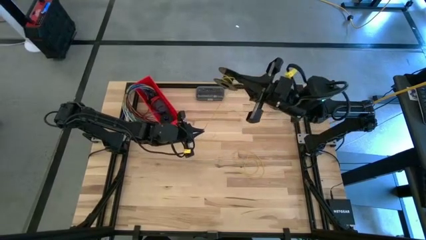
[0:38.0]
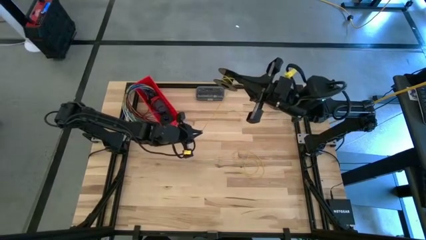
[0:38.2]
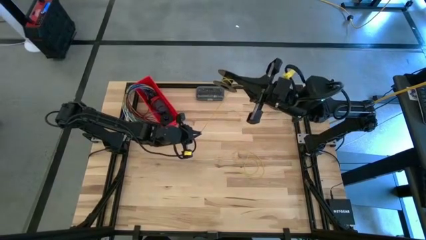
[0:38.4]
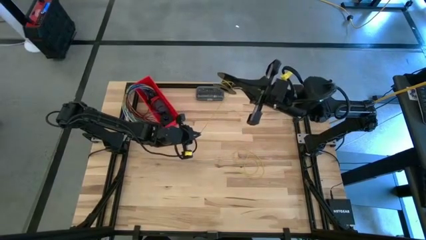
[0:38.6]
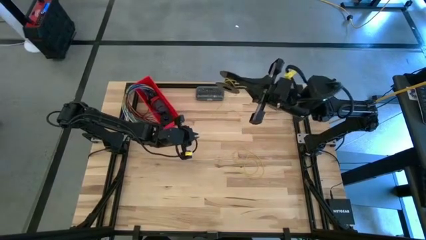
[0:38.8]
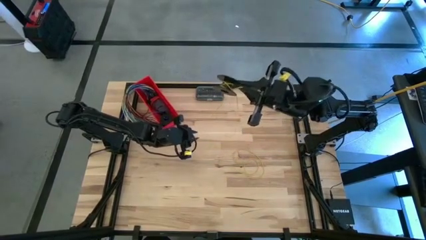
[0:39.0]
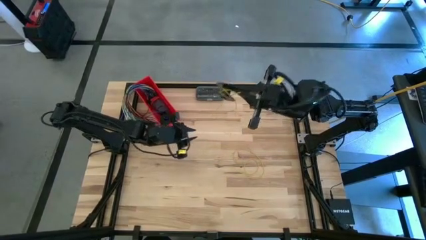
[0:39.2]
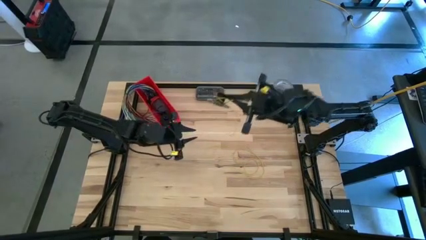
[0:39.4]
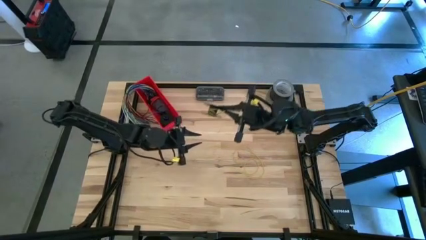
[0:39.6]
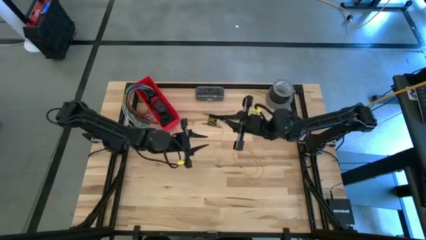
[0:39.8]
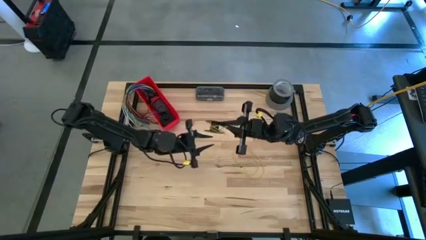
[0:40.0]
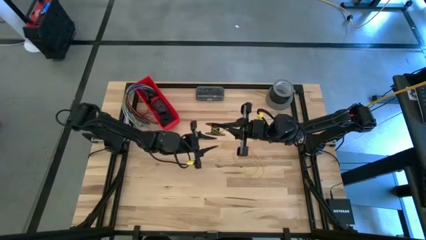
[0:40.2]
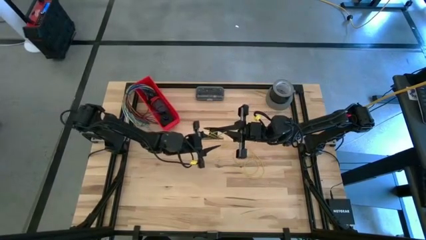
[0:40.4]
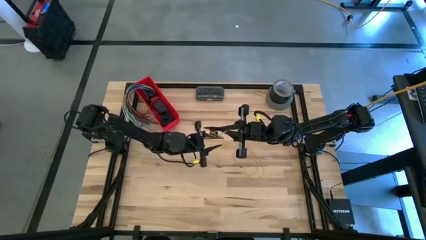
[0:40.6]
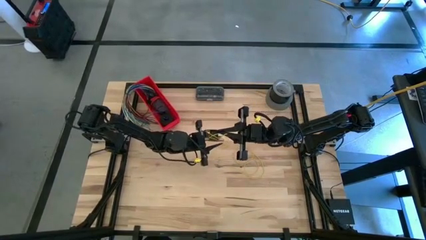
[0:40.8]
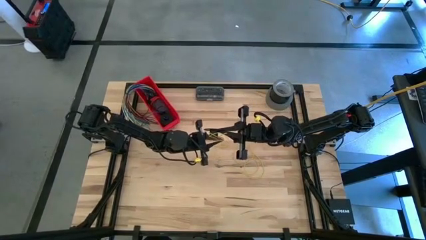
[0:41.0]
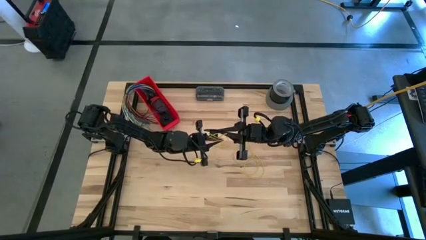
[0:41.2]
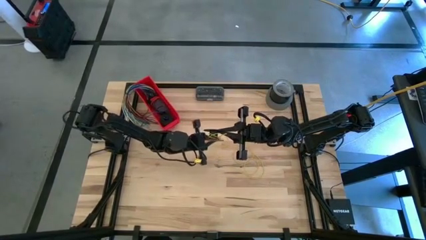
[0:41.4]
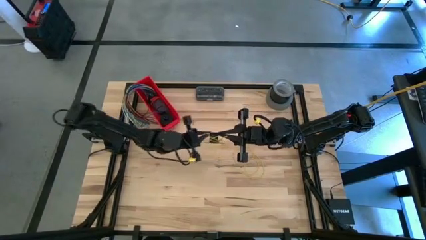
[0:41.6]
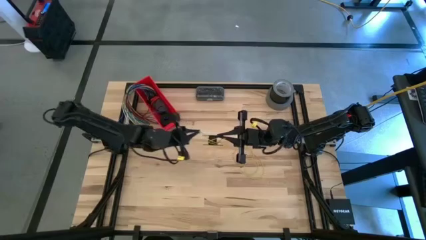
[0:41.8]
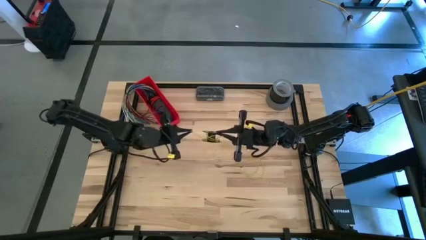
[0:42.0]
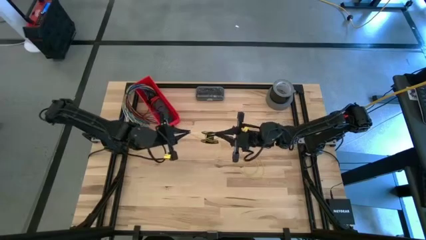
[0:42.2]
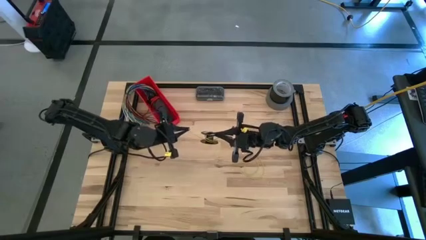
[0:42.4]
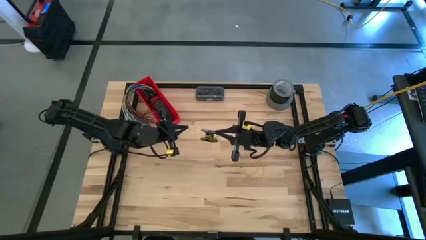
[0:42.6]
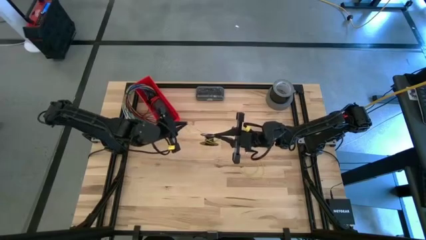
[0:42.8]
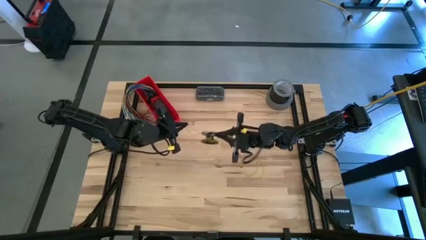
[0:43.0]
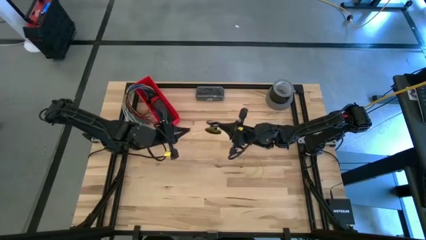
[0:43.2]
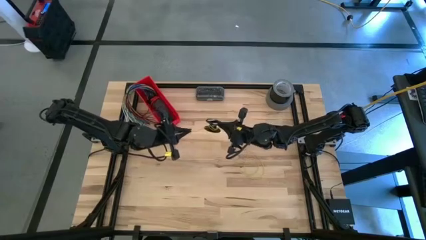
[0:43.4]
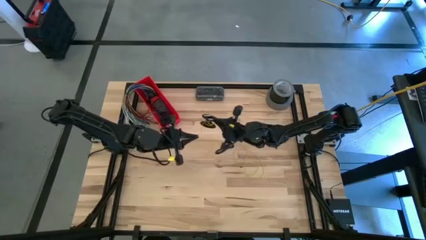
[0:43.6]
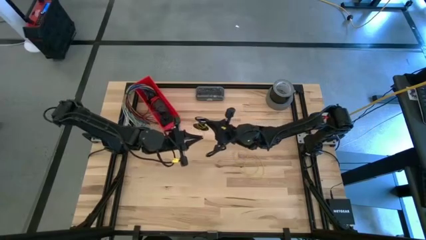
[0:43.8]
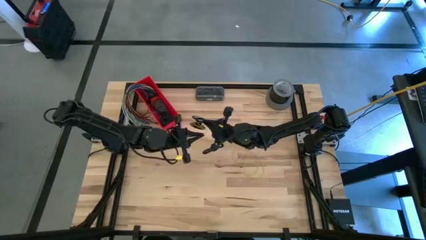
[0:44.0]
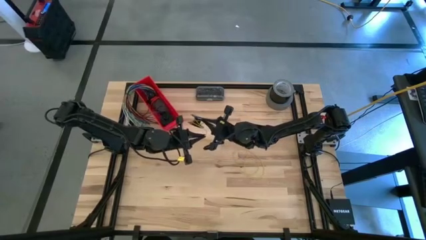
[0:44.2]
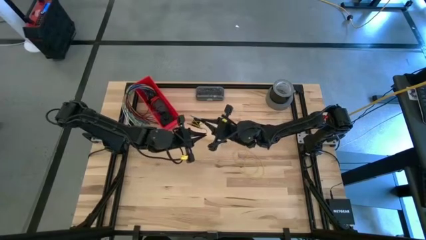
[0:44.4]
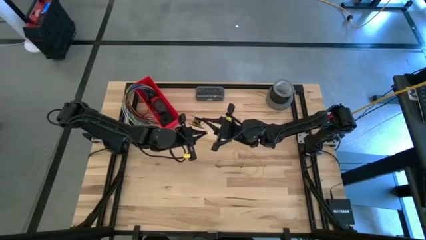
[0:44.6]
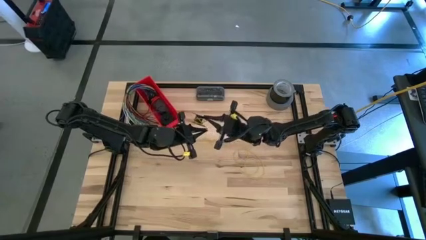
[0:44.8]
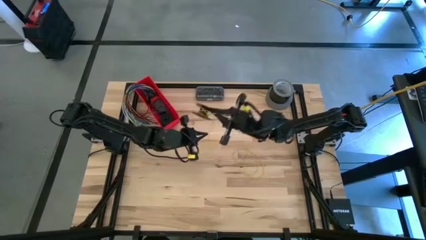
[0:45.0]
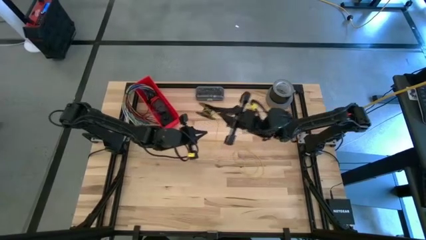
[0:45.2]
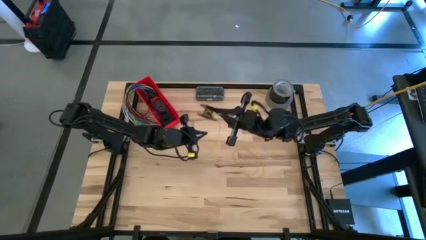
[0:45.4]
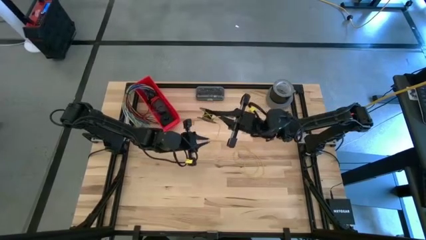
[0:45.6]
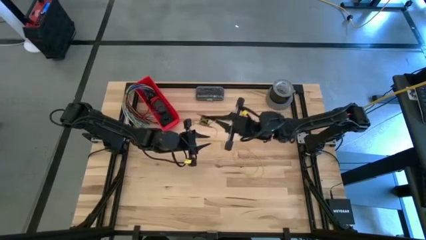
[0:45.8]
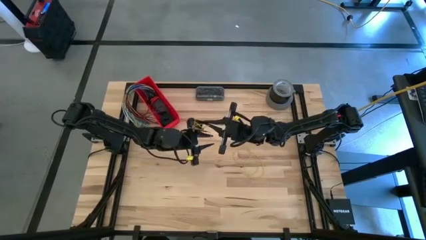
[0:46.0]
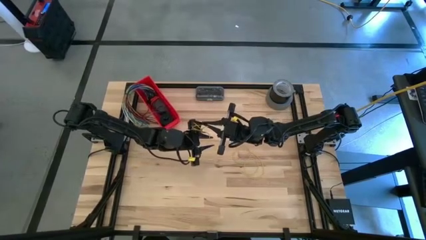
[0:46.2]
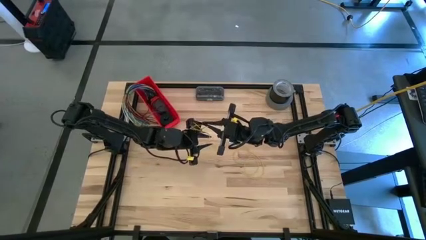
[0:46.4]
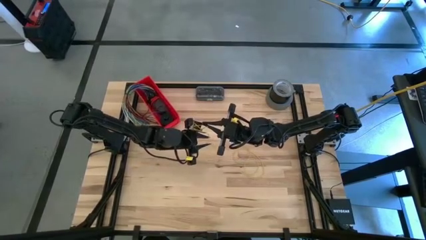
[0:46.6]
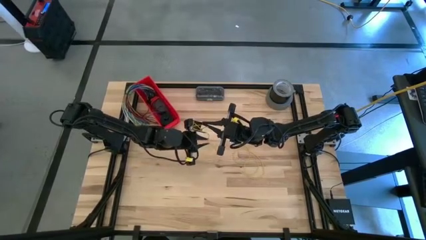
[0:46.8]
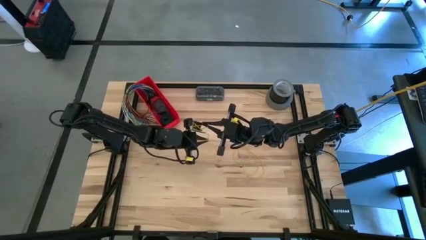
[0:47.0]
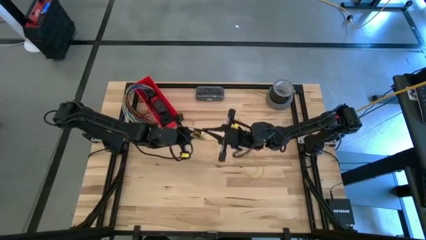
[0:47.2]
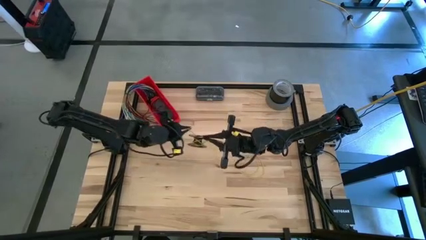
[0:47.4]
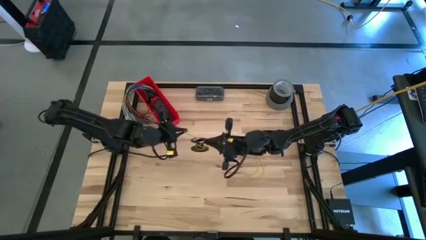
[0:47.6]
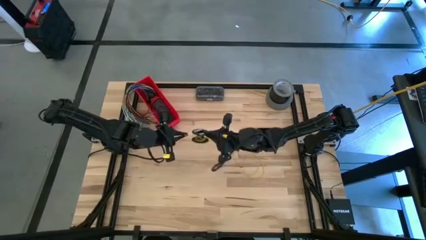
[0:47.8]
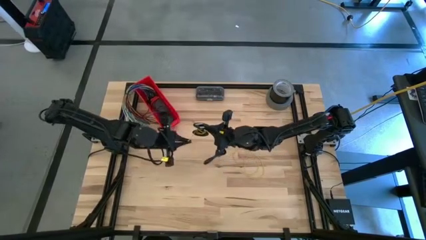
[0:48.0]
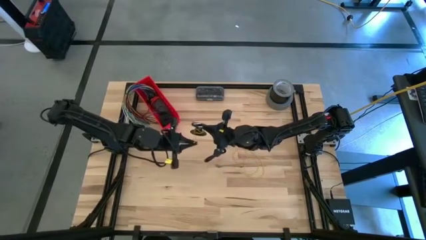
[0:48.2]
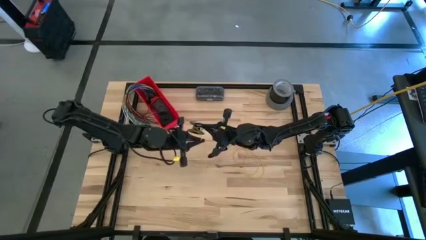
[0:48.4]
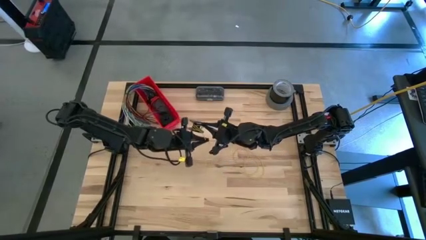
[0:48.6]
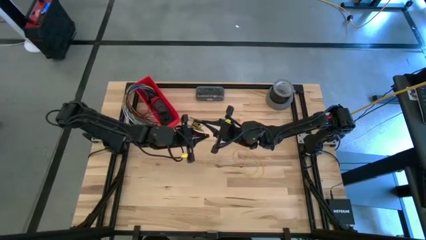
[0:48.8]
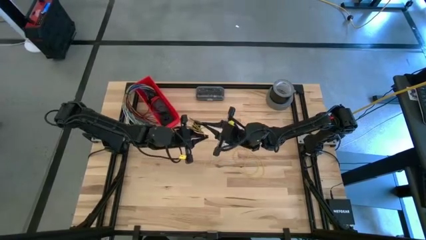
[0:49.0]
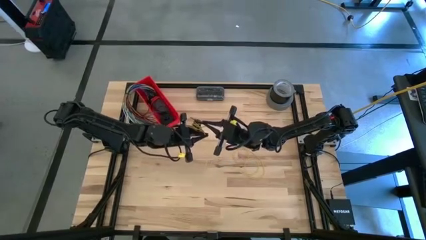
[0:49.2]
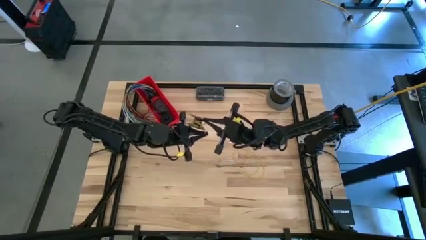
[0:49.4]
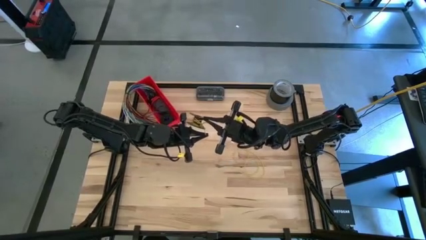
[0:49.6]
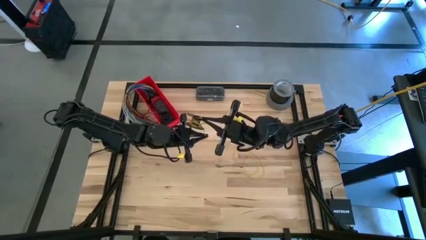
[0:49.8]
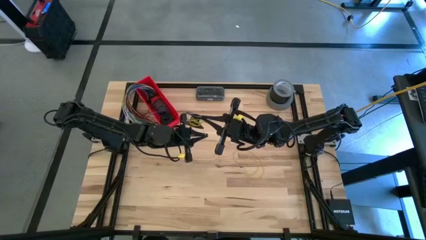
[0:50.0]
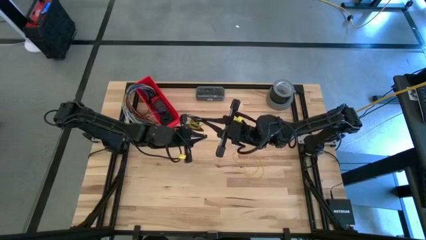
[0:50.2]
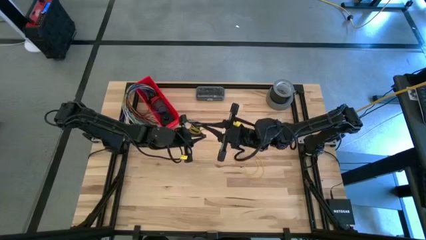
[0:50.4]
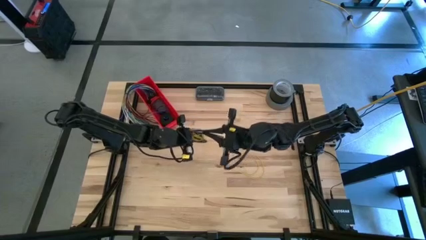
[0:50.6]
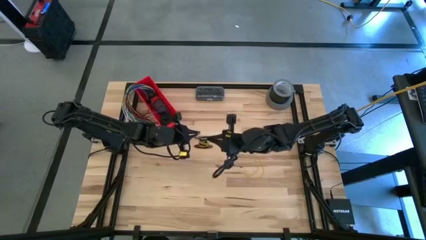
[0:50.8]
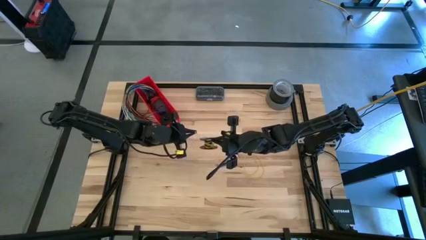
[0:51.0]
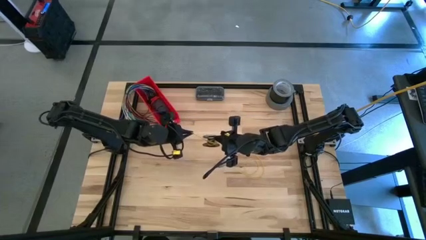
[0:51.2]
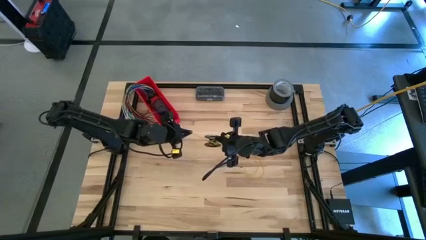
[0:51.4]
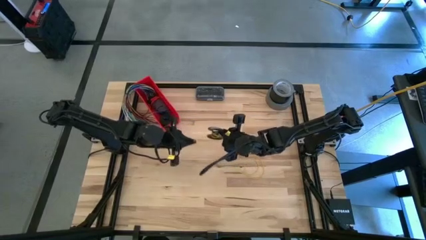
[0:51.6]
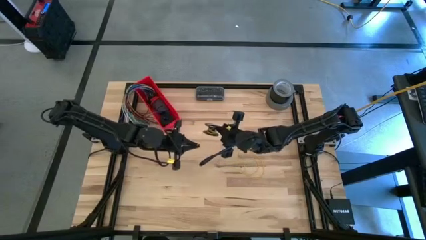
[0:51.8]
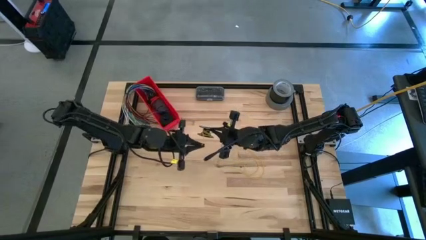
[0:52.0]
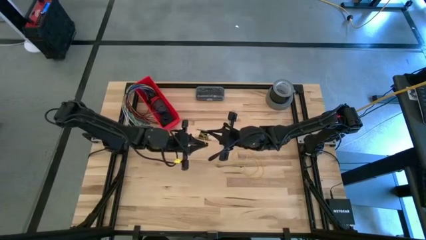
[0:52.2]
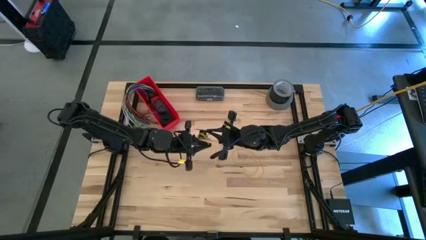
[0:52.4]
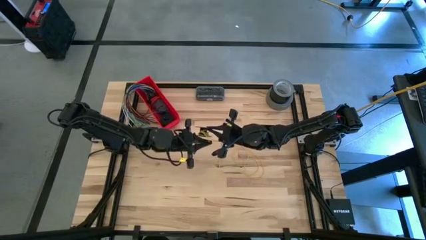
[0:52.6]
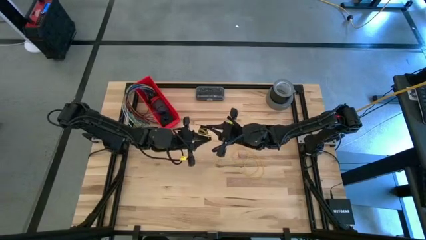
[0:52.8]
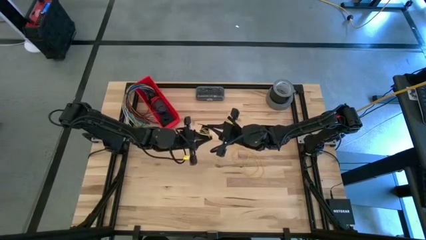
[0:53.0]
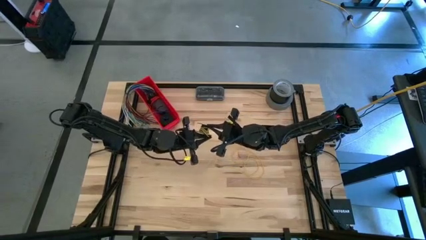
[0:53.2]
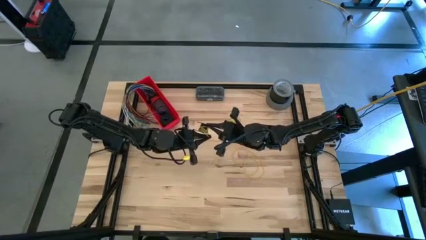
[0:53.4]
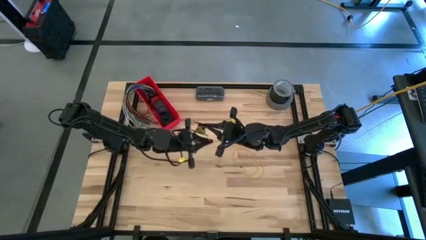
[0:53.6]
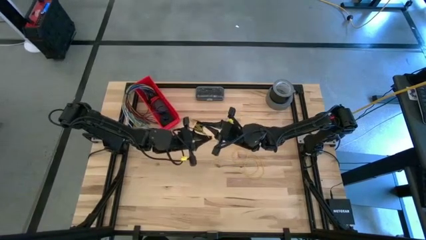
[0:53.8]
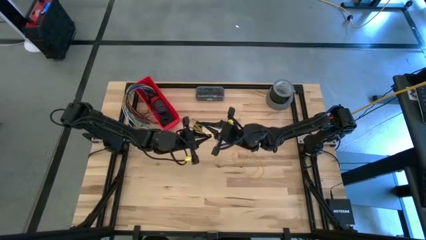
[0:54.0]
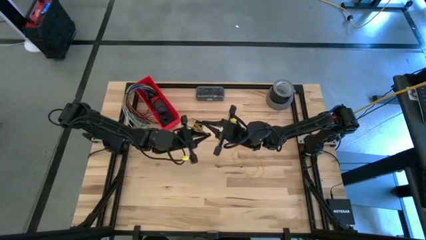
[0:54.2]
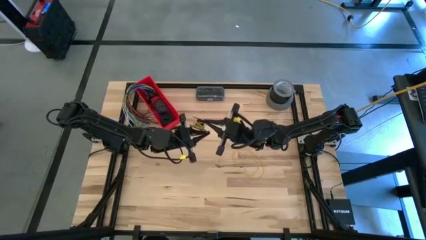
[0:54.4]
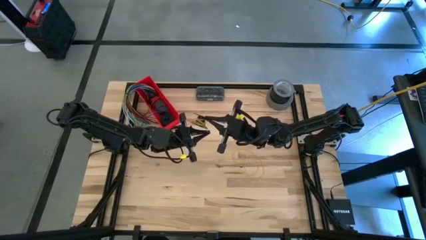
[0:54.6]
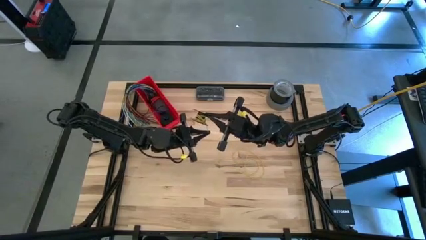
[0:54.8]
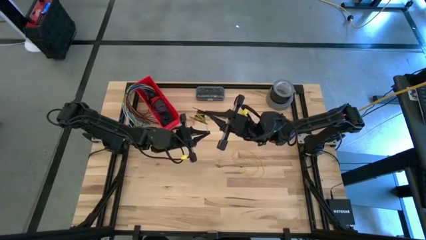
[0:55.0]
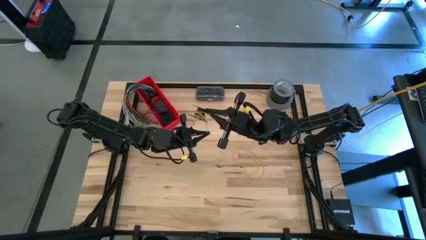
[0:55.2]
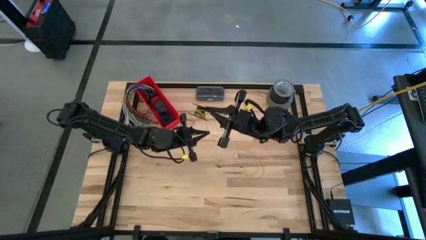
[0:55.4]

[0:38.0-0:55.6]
Task: Coil cords
Coil the yellow wire on the spool
